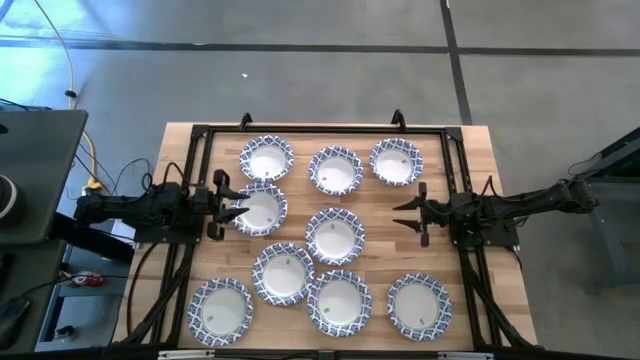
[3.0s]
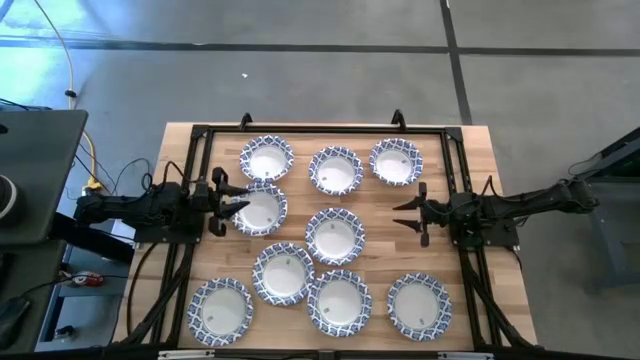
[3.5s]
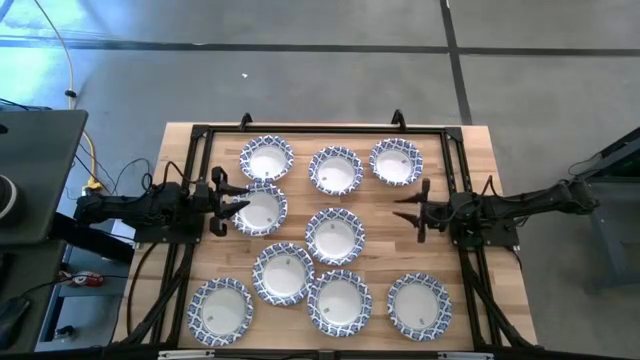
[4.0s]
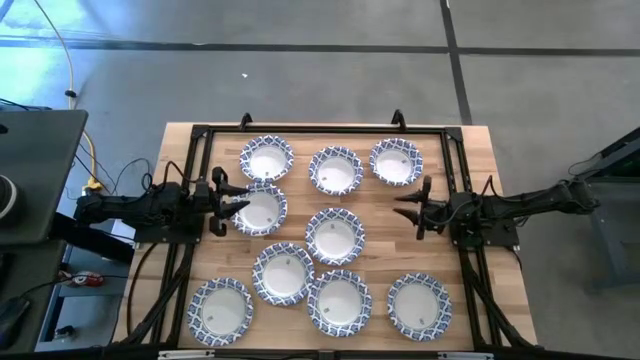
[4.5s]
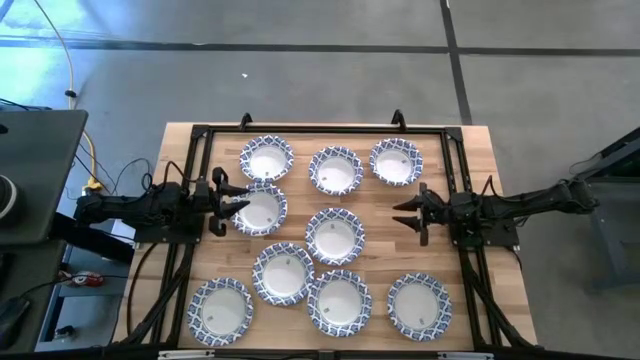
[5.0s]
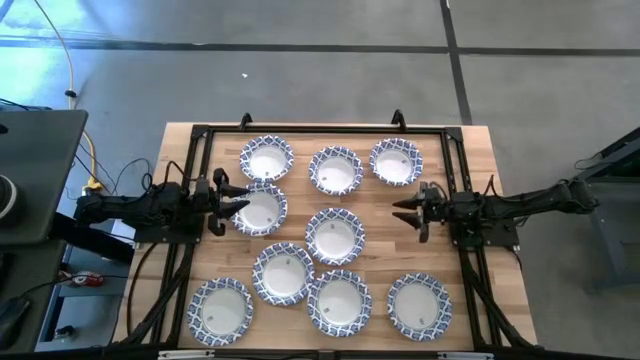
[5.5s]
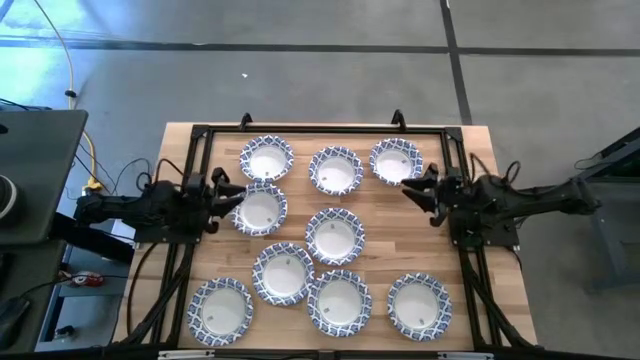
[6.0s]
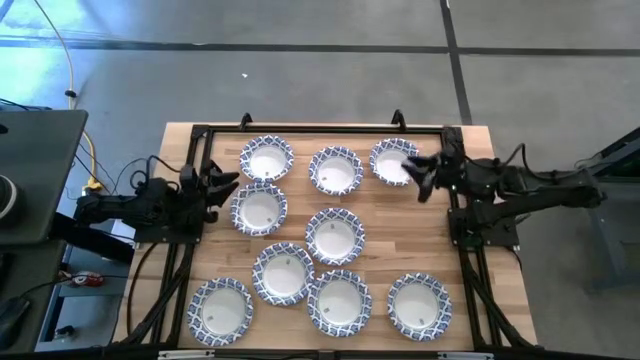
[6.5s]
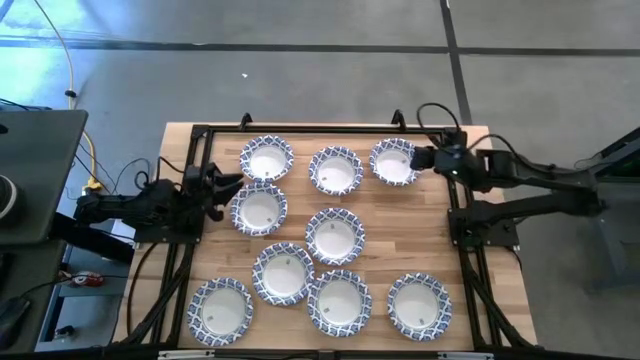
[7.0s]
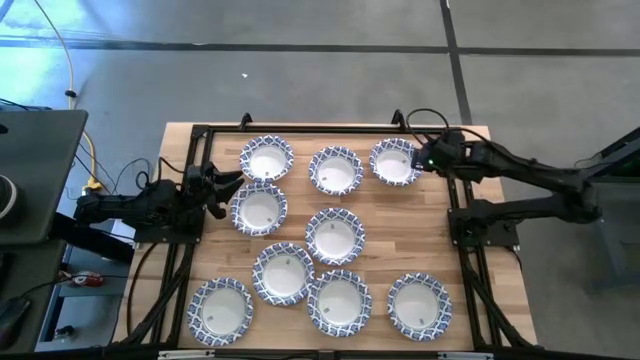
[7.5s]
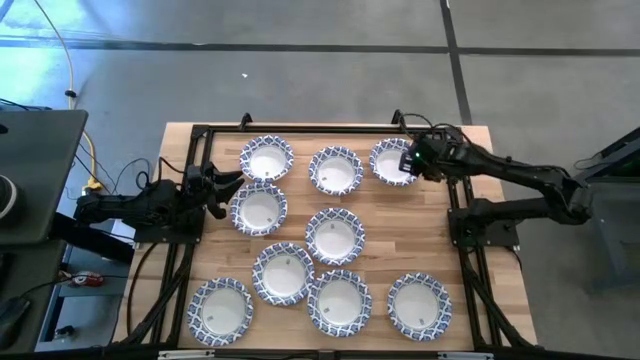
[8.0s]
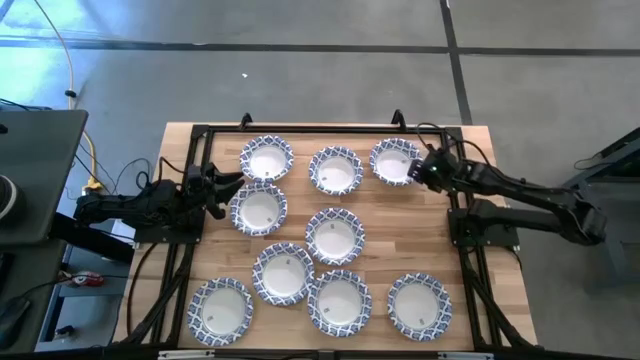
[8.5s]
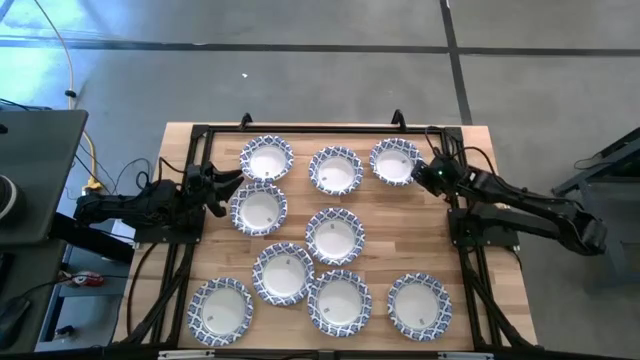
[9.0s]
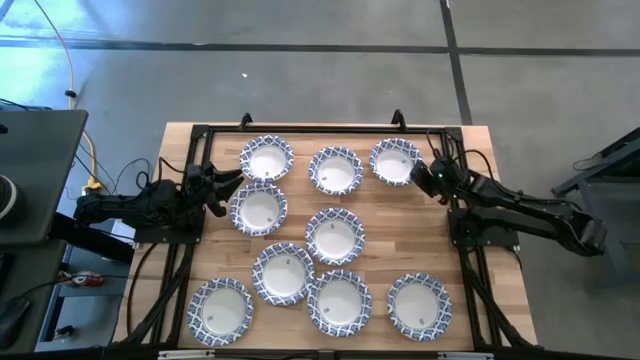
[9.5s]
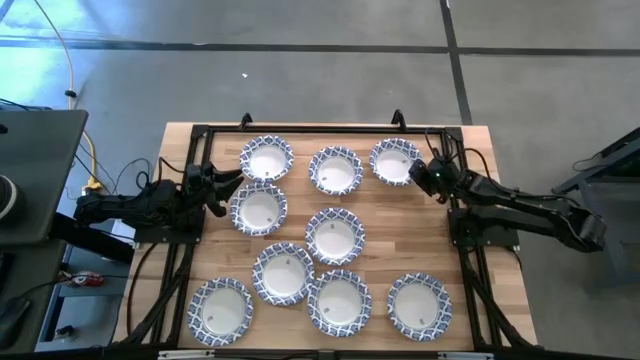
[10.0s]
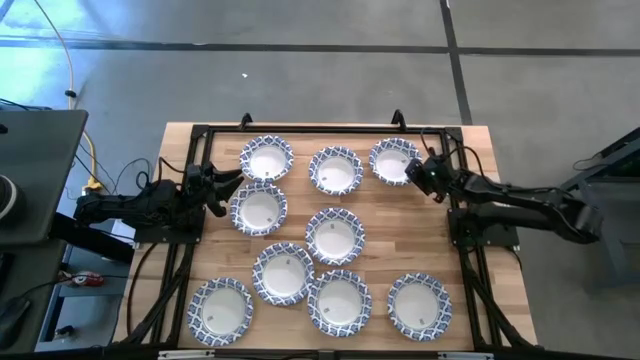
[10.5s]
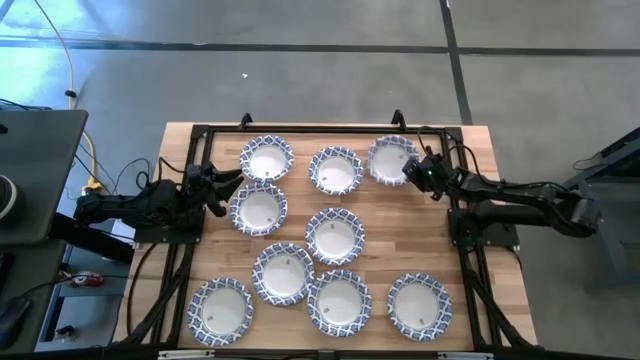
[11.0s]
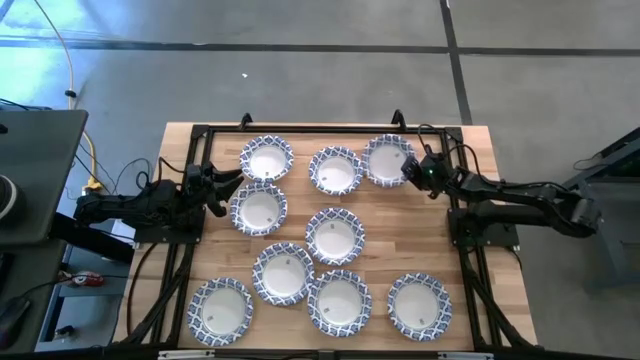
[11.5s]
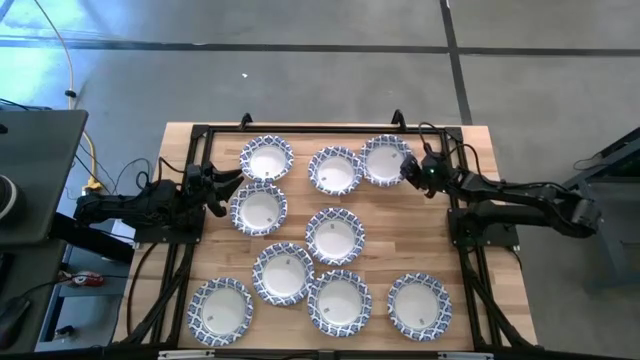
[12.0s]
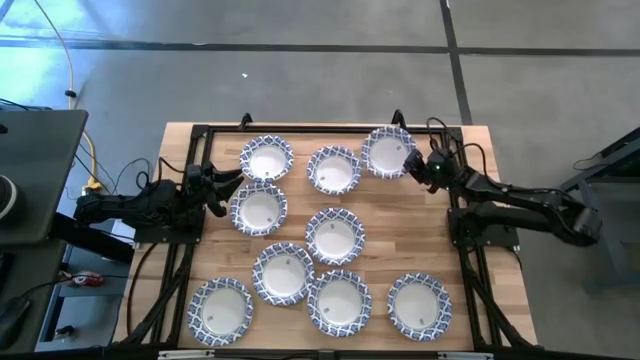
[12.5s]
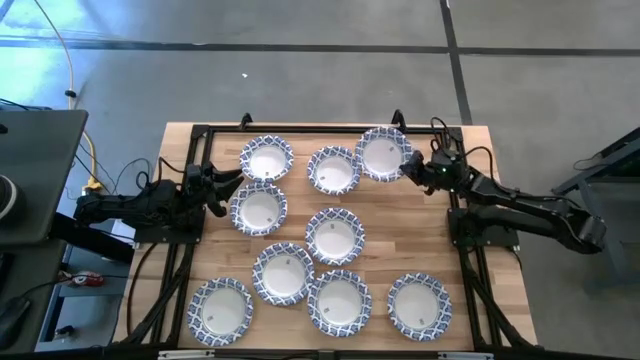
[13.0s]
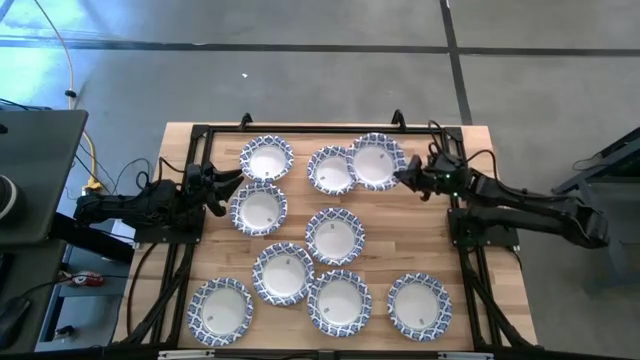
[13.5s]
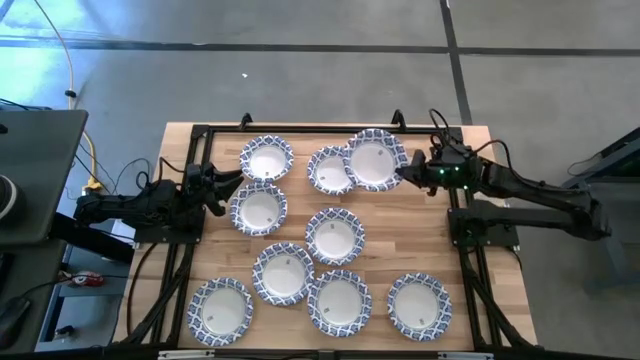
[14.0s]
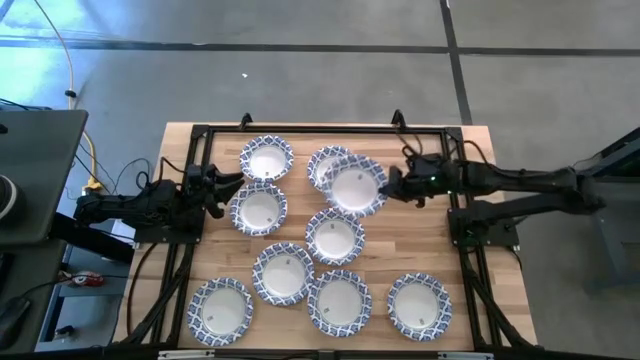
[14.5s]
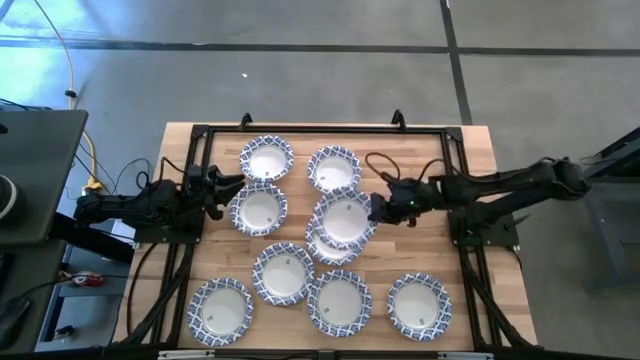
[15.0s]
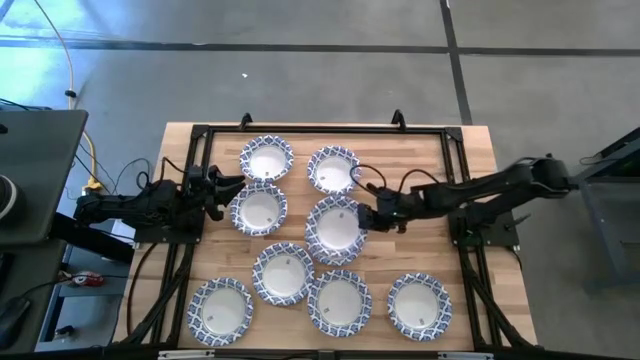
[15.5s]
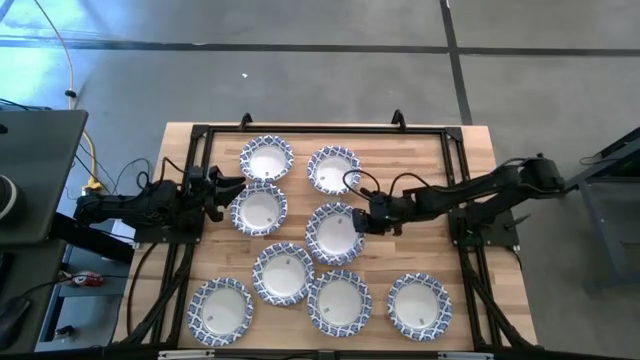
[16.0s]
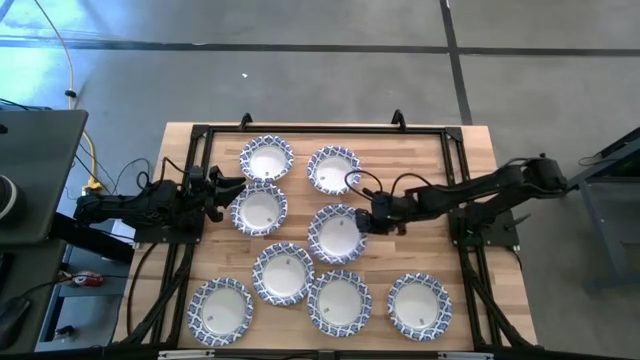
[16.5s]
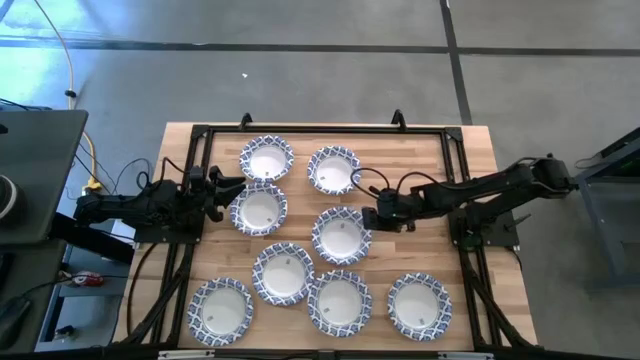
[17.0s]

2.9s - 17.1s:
Task: Nest bowls inside each other
Stack the white patterned bowl on top of the other white patterned bowl

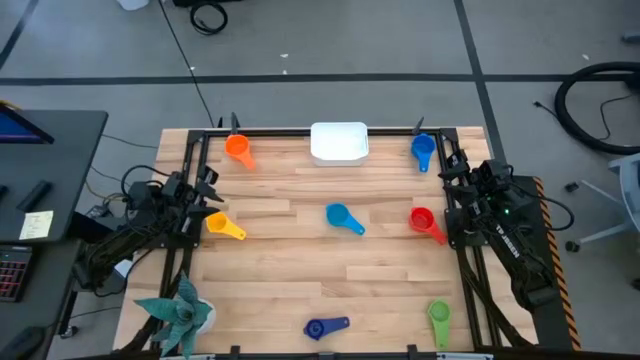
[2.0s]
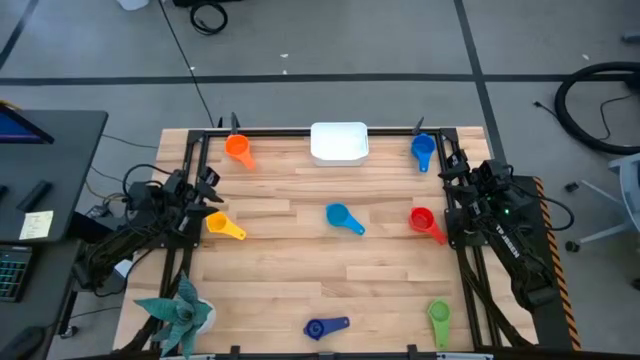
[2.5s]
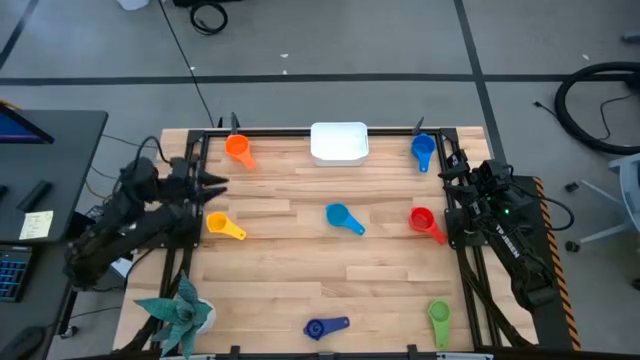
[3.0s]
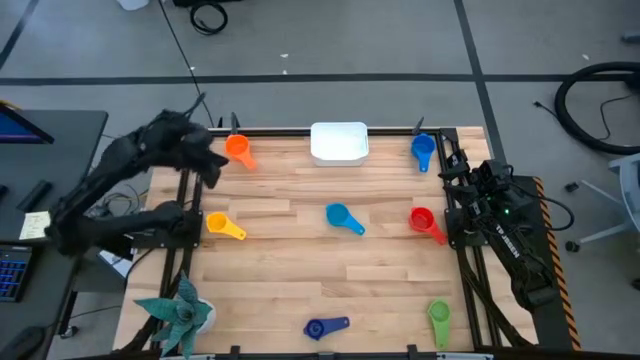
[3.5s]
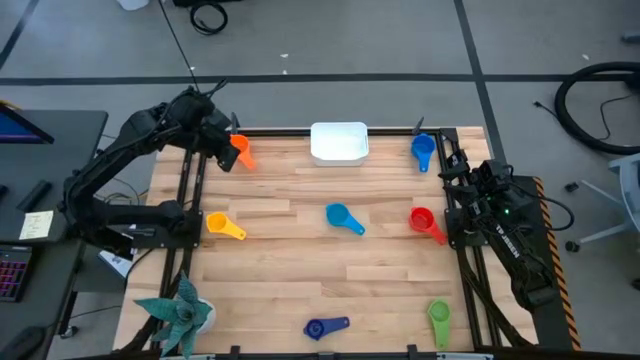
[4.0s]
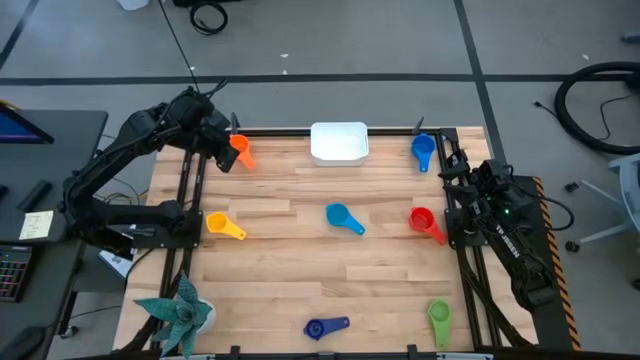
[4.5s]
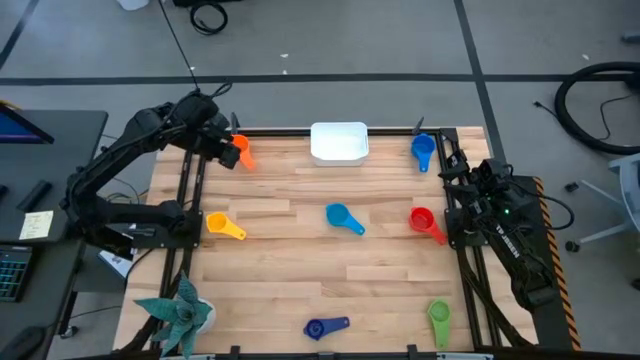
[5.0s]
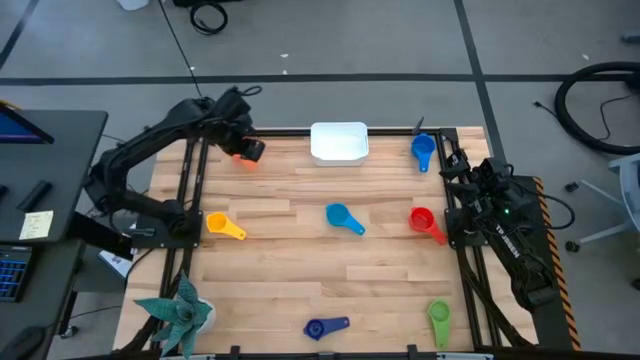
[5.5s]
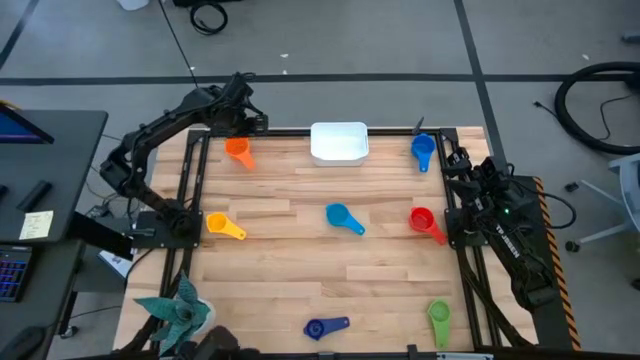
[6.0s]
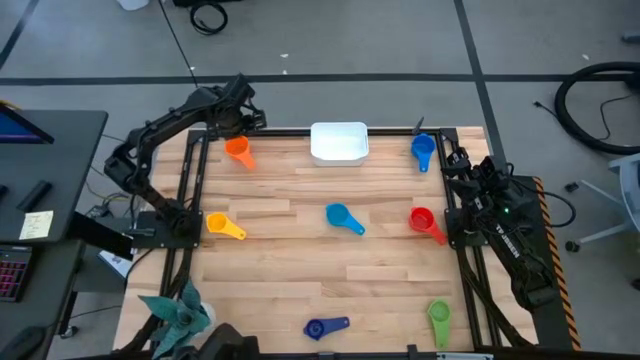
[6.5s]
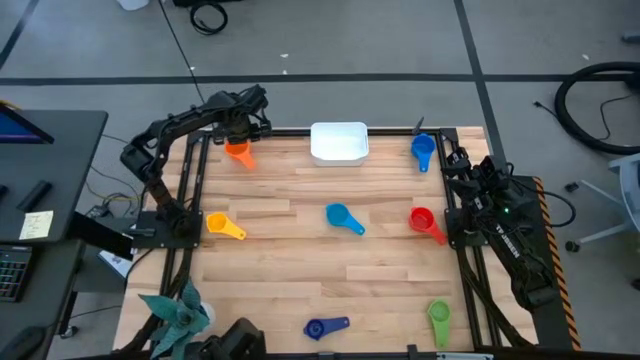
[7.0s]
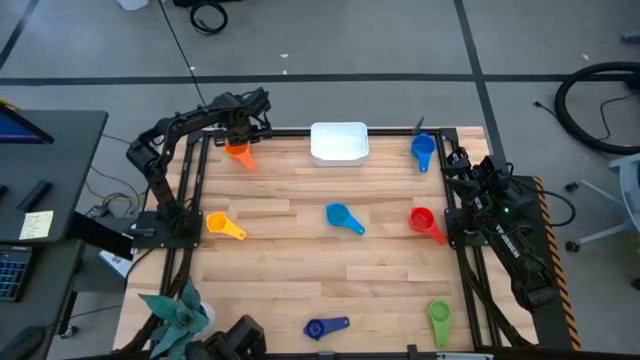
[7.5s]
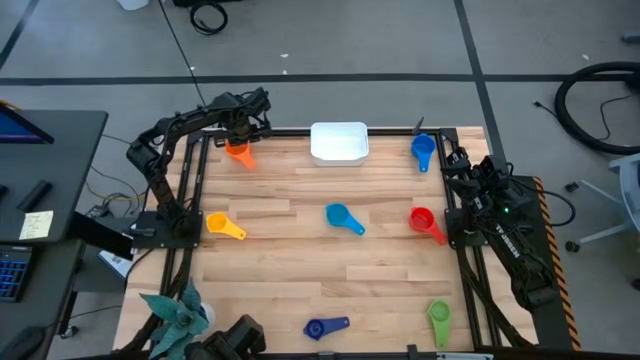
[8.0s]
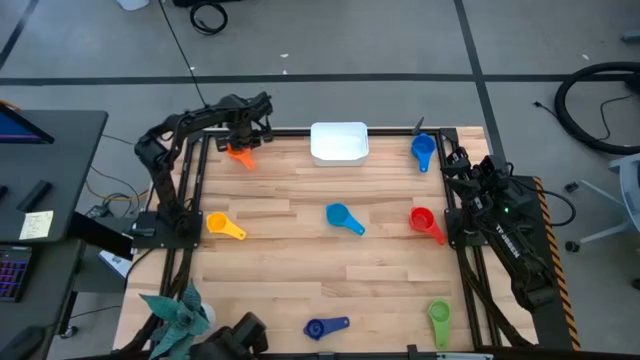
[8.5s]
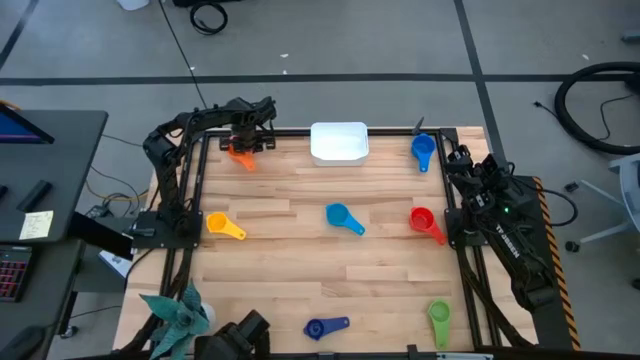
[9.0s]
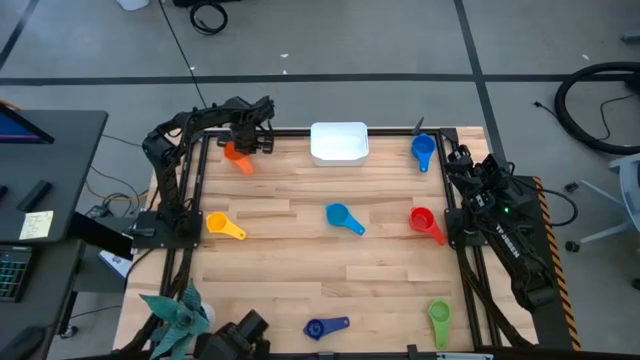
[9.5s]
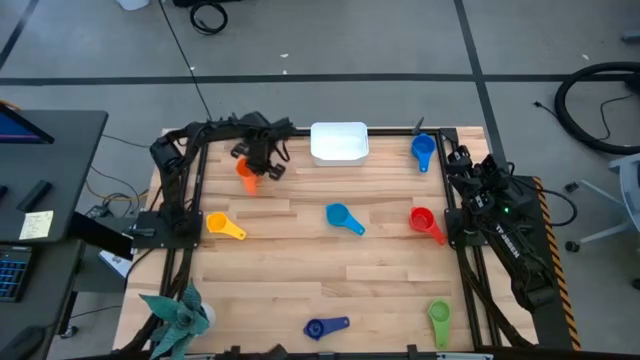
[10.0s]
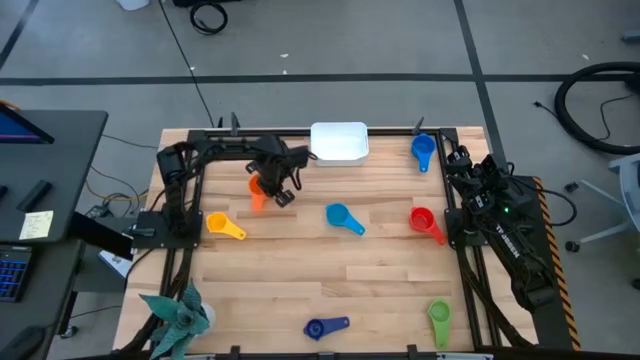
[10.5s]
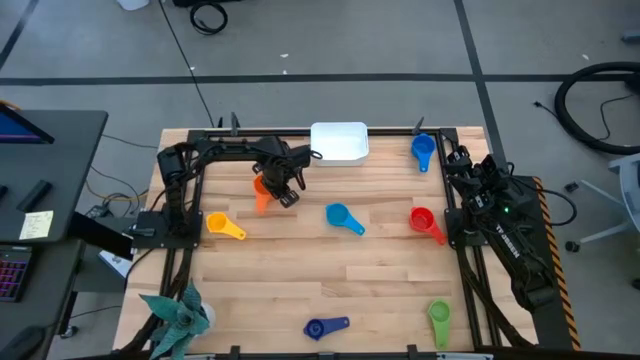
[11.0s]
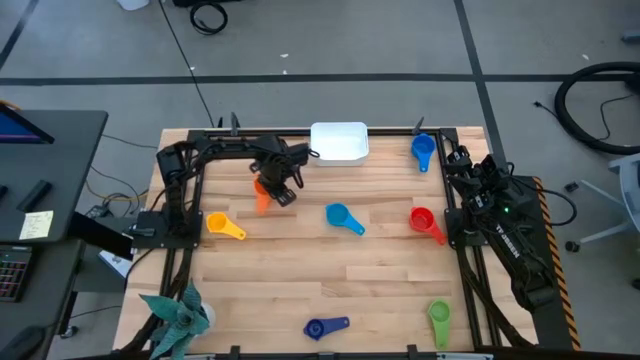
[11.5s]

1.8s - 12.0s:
Task: Nest measuring cups in basket
Move the orange cup
